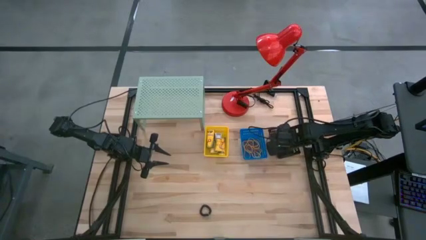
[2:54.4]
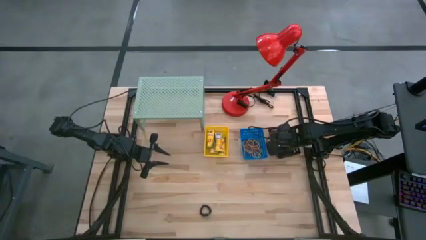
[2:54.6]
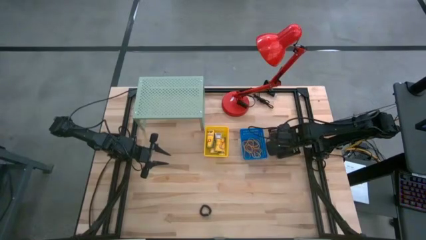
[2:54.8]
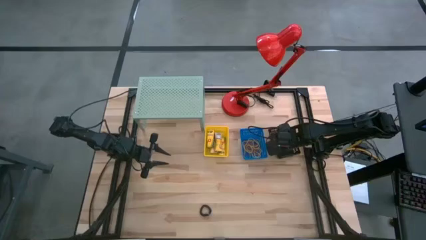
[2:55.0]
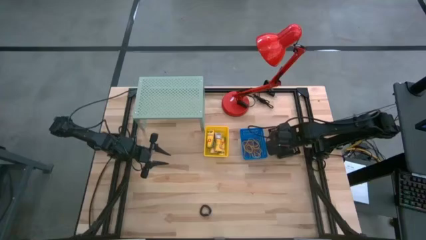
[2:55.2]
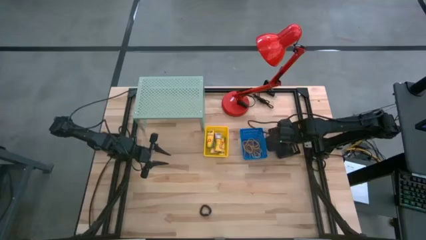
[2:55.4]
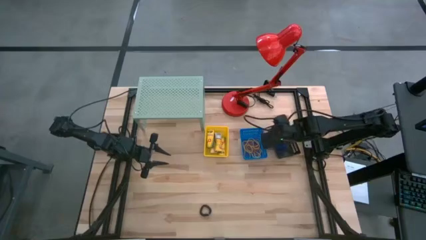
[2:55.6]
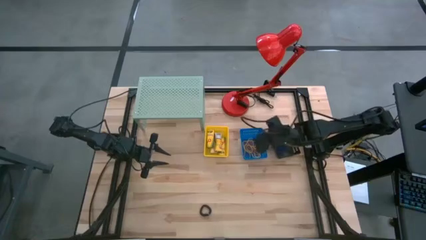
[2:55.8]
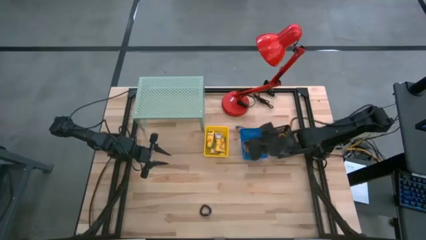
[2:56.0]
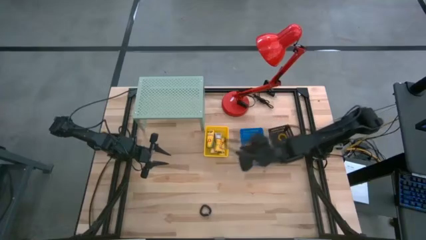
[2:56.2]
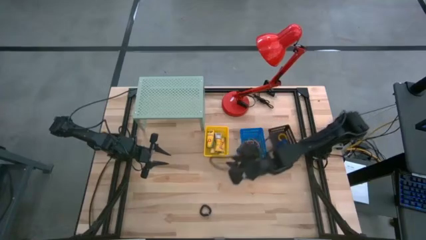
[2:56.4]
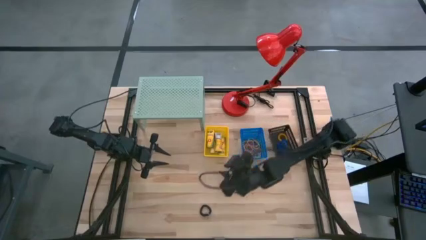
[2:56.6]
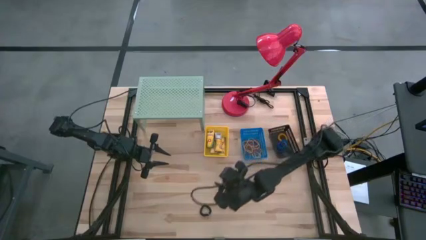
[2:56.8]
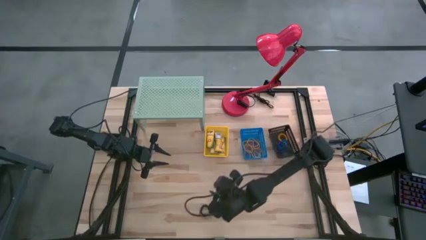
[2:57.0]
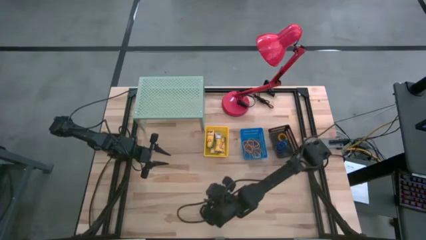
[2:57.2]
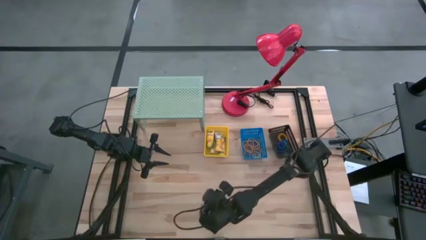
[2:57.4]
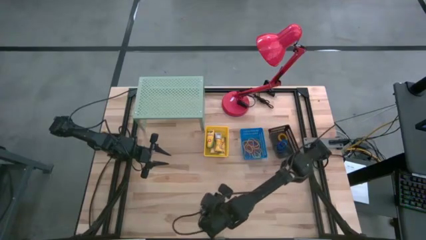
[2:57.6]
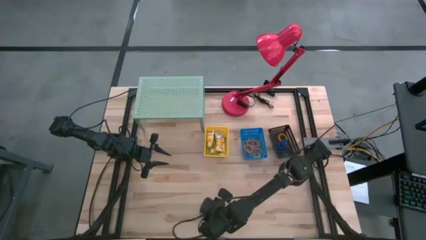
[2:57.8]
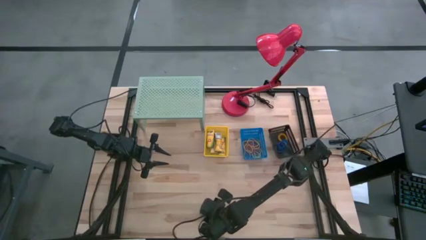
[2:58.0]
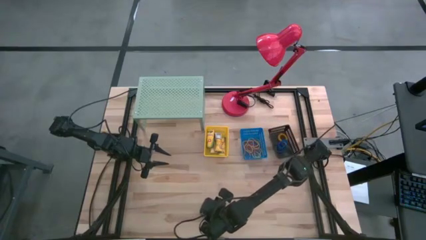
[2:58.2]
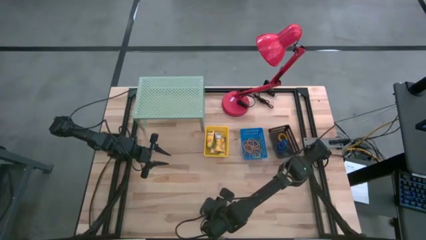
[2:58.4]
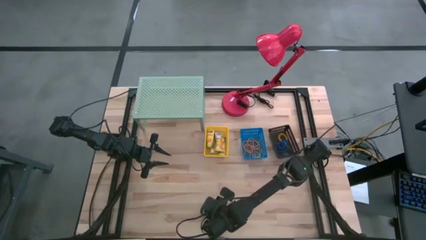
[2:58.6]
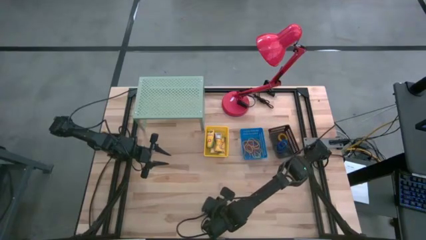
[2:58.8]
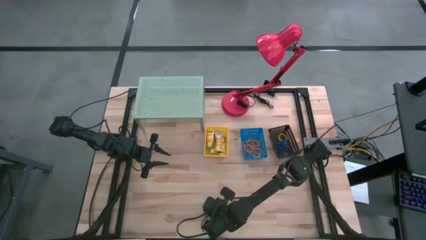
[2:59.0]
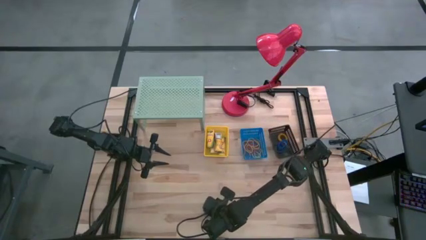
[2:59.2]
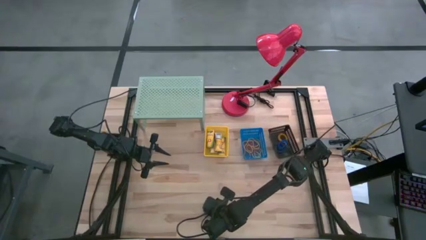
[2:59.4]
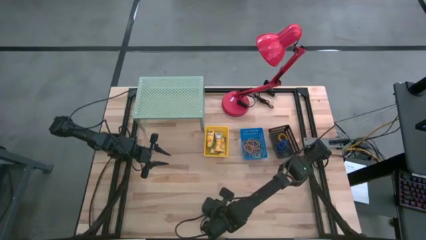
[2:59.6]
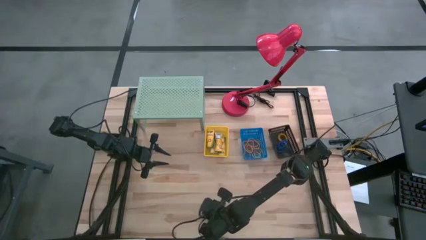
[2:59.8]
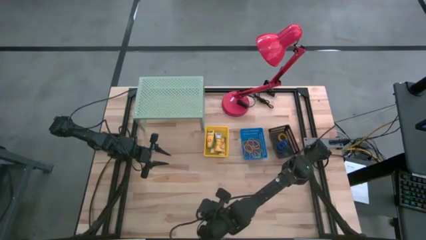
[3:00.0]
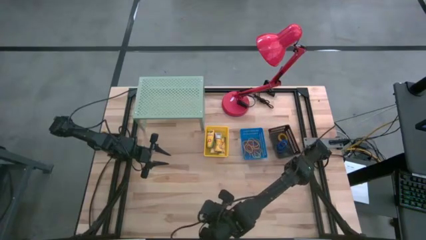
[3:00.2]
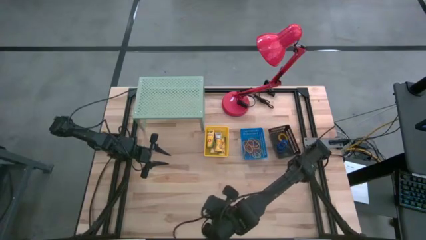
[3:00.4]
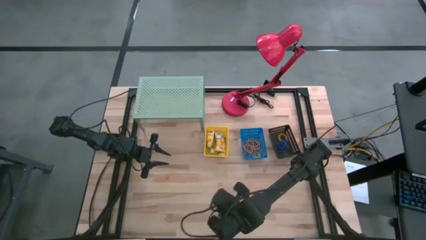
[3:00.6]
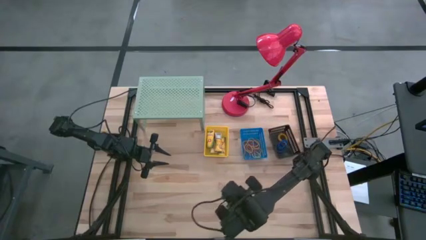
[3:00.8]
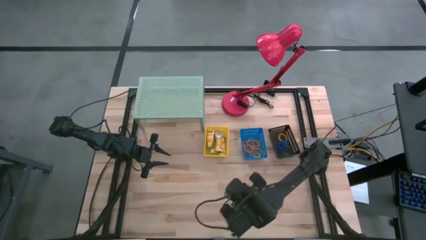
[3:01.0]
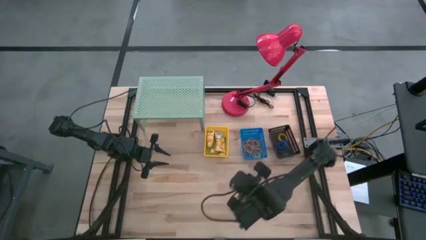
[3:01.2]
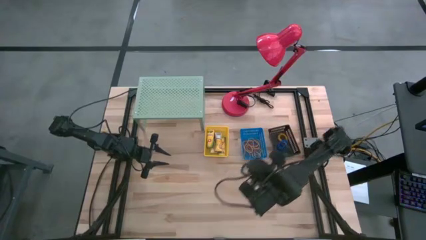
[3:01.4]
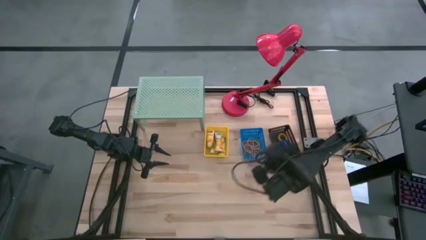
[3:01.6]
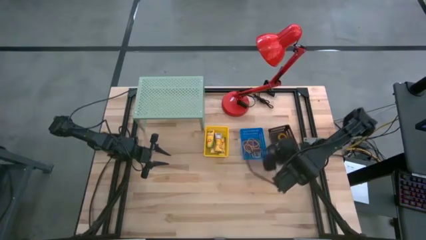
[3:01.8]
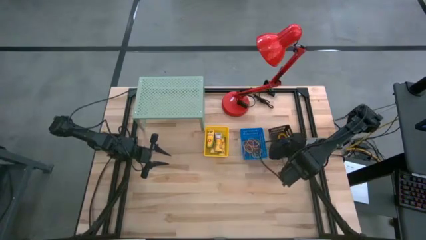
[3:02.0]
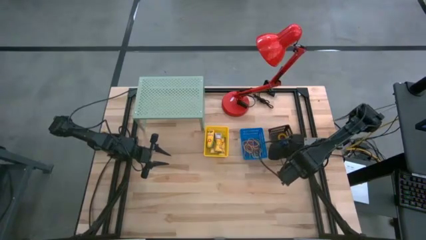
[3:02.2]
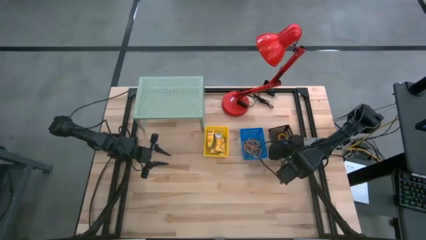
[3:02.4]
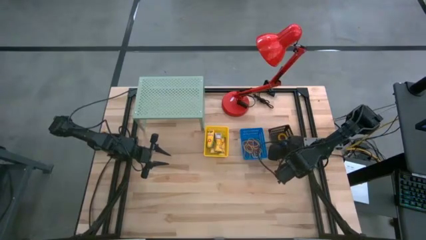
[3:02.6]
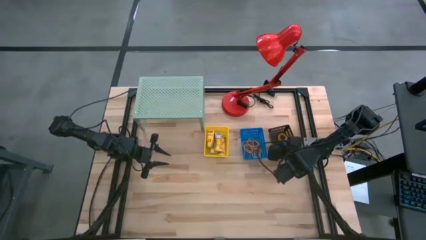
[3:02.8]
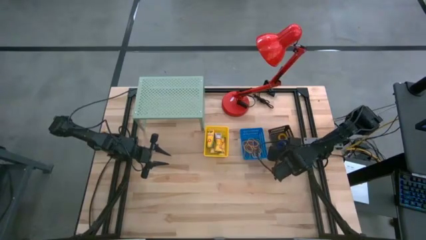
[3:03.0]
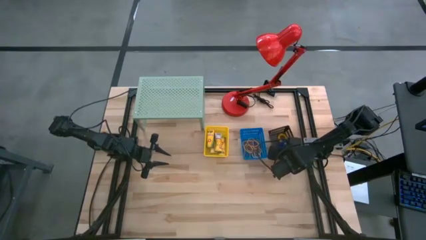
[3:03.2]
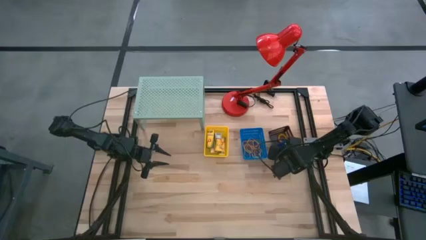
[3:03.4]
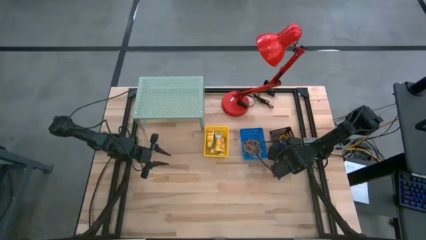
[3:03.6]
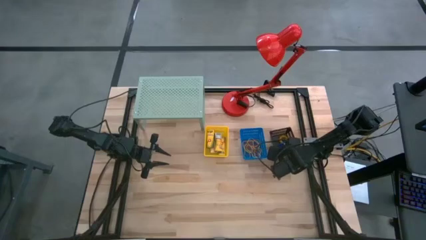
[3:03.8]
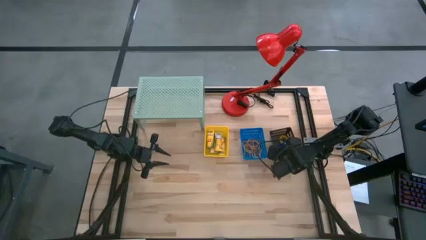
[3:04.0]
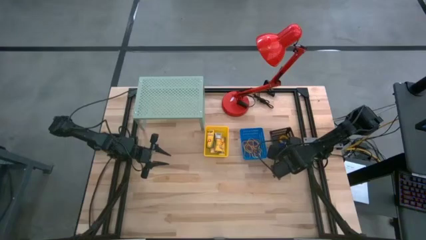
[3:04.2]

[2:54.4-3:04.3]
Task: Pick & Place Office Desk Supplies
Put the black spring keychain into the black basket

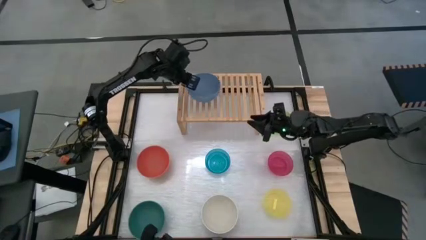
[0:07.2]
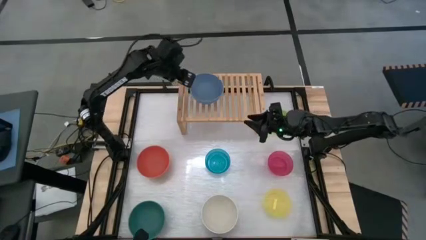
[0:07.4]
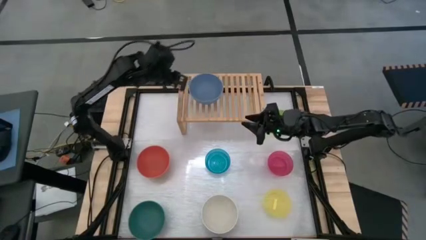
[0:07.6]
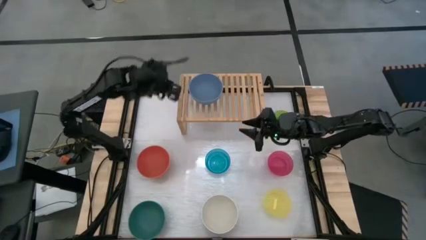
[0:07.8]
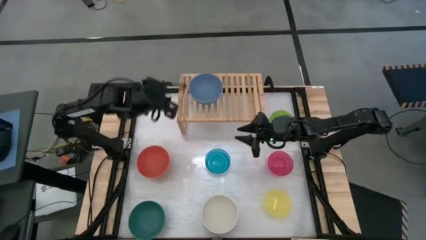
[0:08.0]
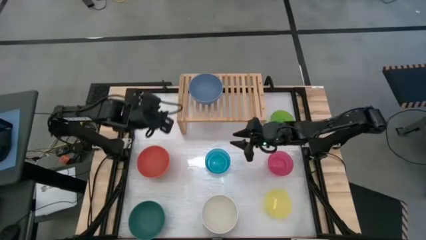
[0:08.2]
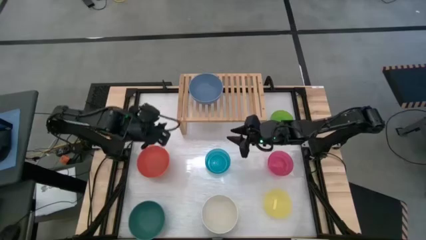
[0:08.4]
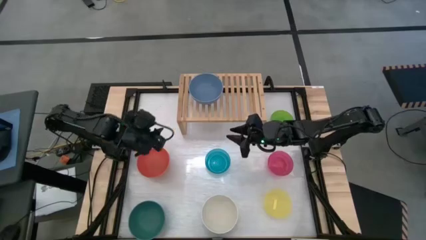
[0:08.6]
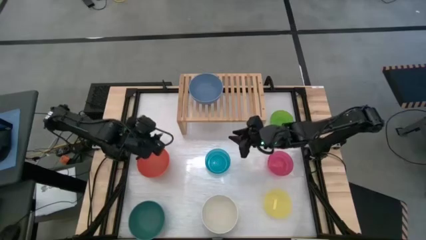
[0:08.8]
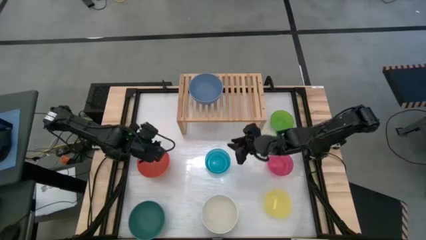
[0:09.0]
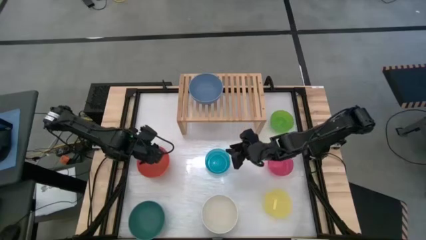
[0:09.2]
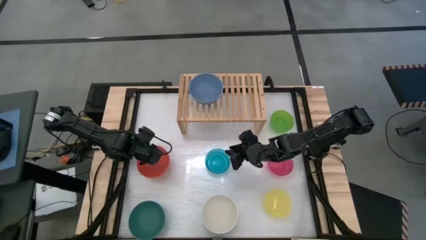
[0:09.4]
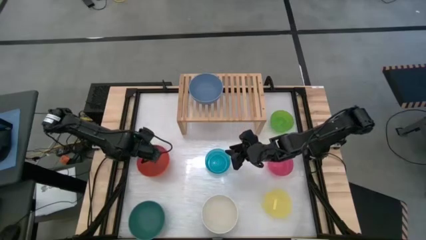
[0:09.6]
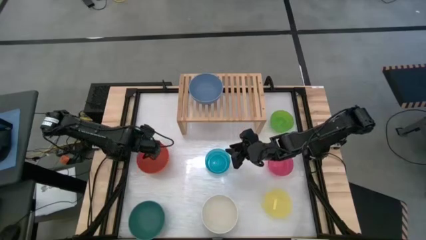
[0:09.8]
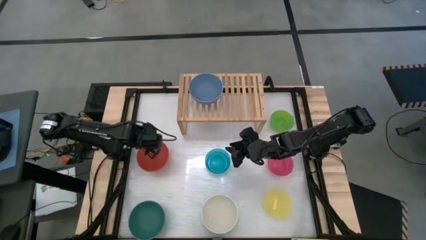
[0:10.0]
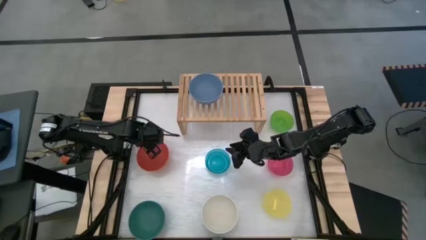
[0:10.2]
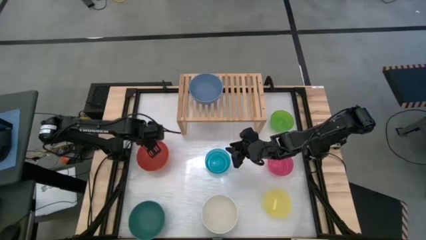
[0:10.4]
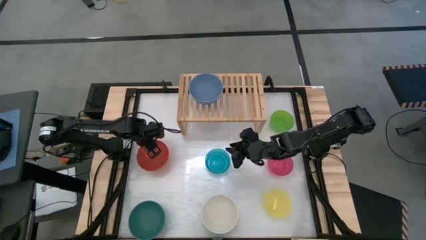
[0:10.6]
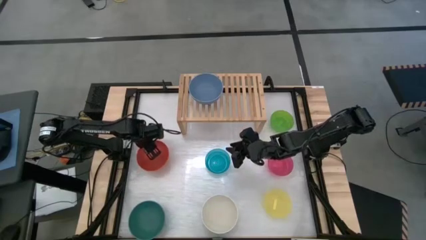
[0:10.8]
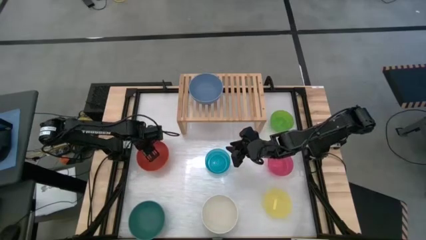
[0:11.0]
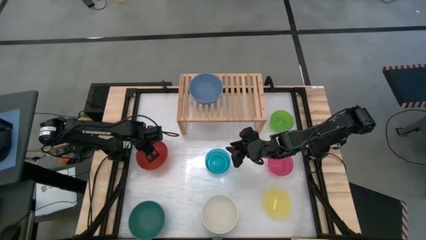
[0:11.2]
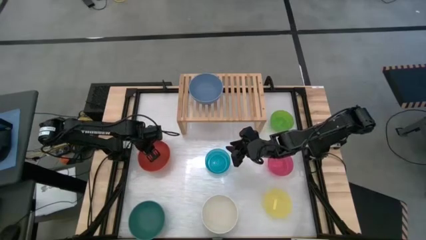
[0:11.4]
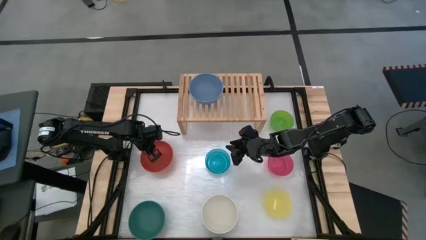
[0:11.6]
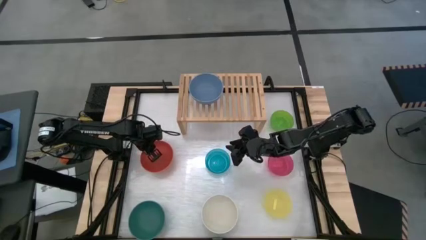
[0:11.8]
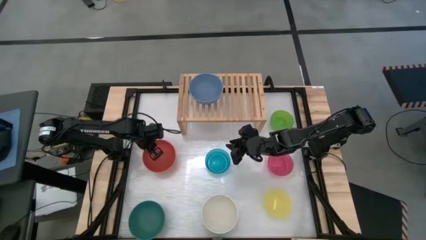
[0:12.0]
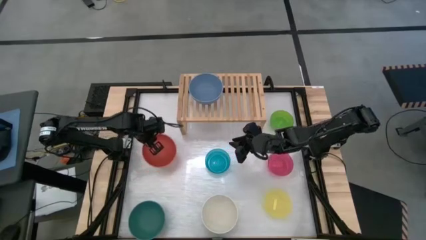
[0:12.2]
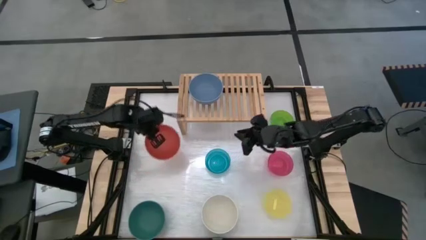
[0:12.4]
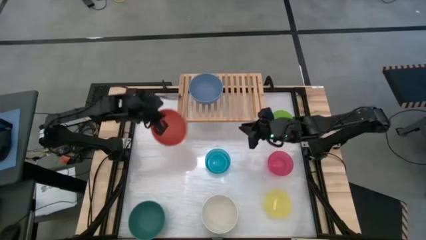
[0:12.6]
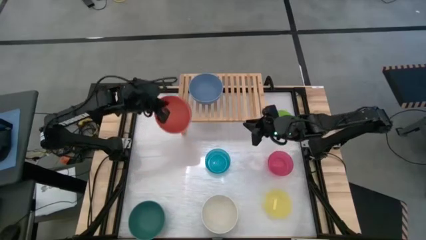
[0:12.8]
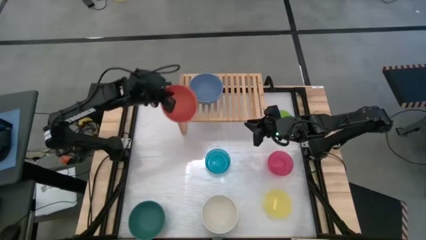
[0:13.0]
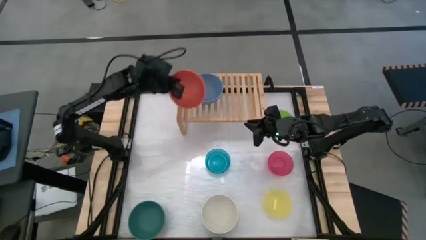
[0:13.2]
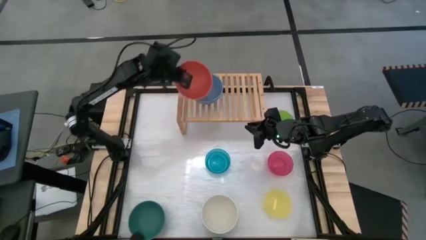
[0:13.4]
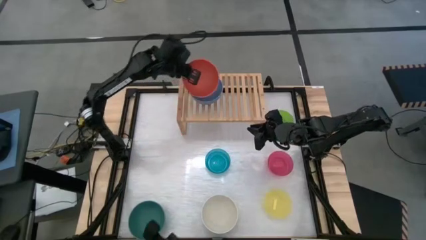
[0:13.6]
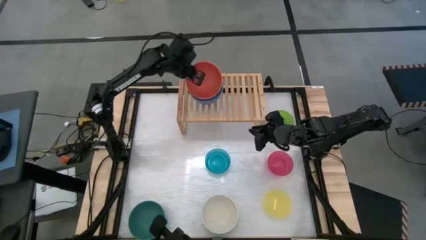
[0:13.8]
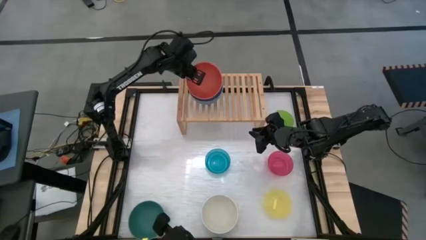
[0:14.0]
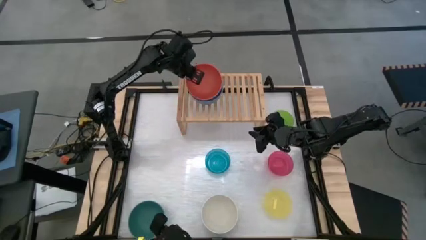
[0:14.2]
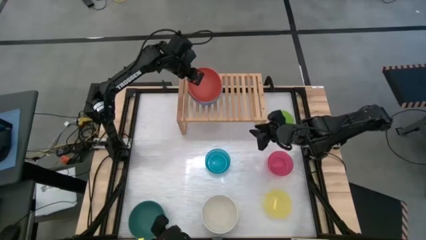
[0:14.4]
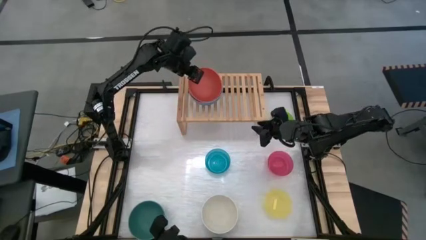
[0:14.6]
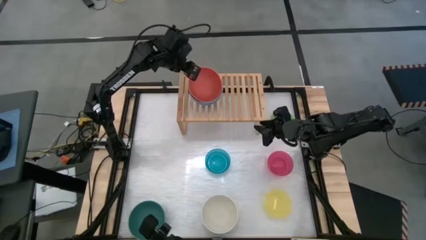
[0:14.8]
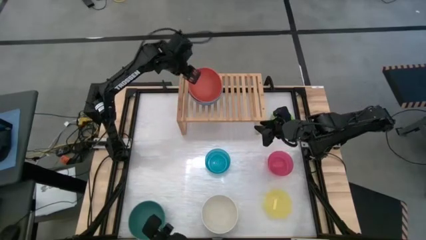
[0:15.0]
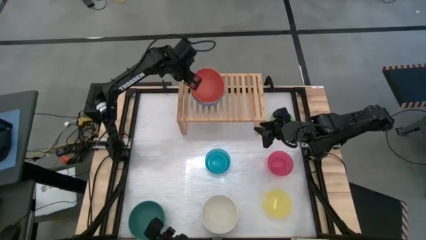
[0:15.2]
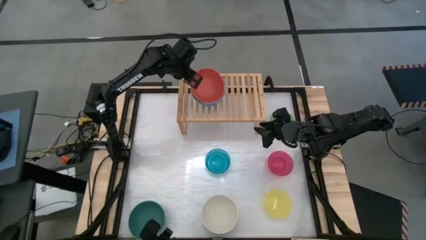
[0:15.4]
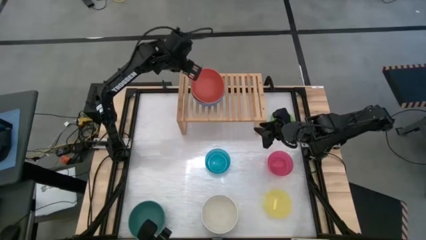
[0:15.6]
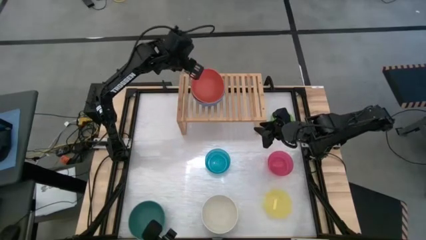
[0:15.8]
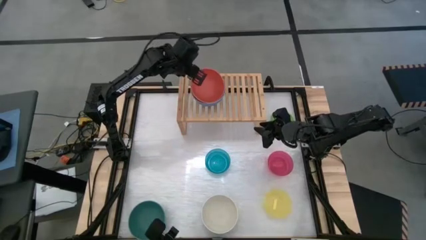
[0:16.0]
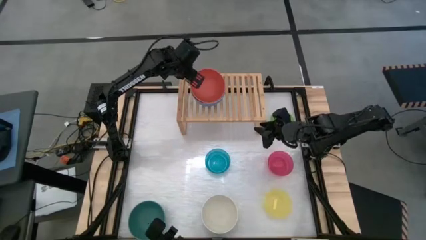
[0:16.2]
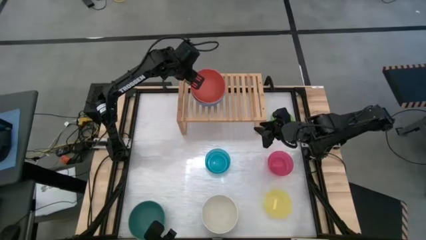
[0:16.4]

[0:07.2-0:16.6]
Task: Place and stack bowls onto a shelf
Stack the orange bowl on top of the blue bowl on the shelf
